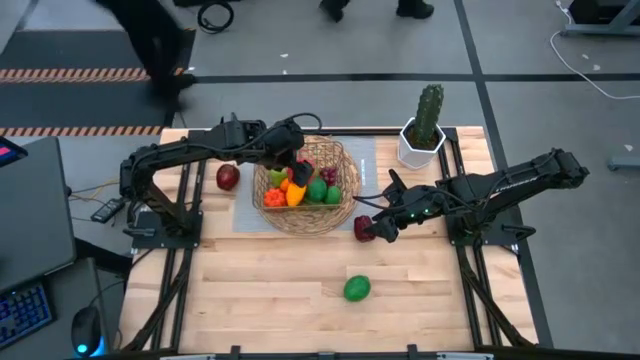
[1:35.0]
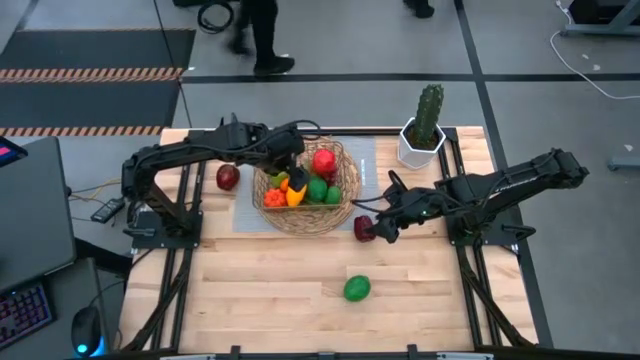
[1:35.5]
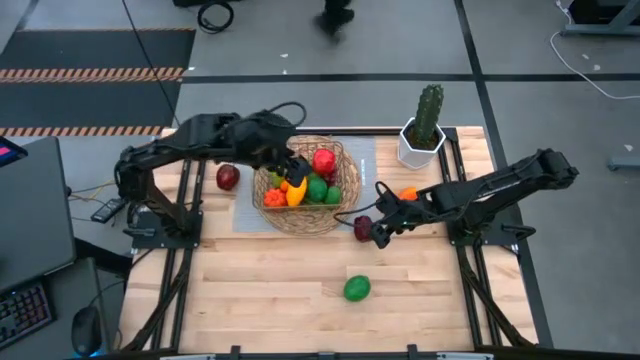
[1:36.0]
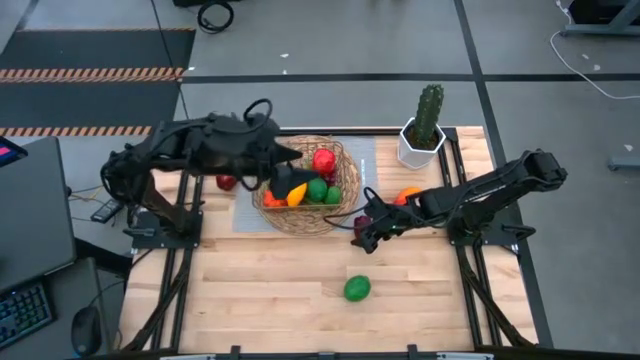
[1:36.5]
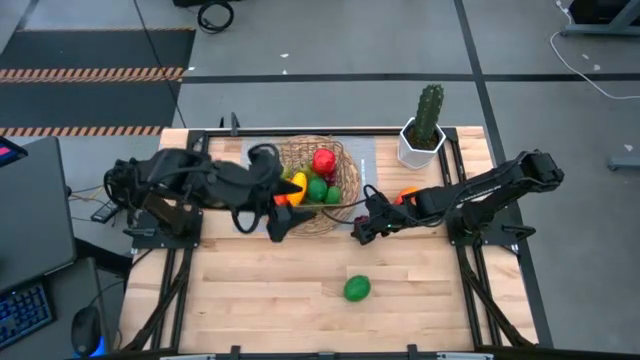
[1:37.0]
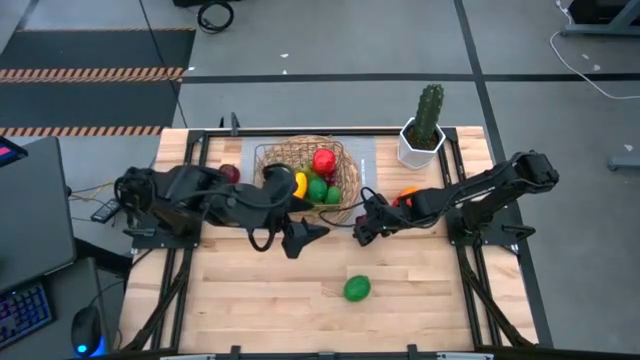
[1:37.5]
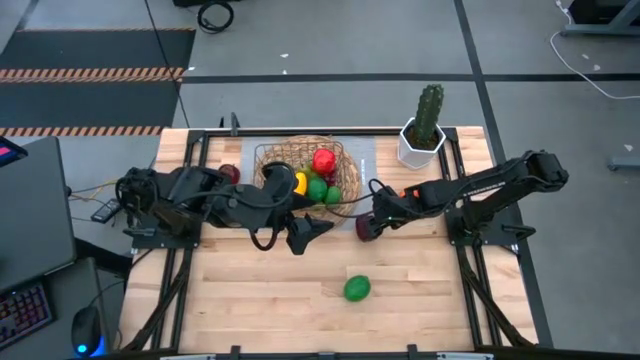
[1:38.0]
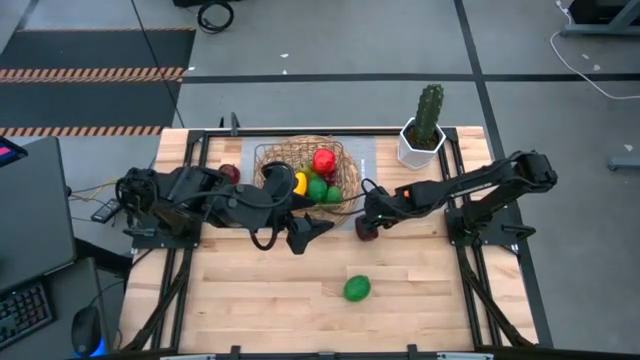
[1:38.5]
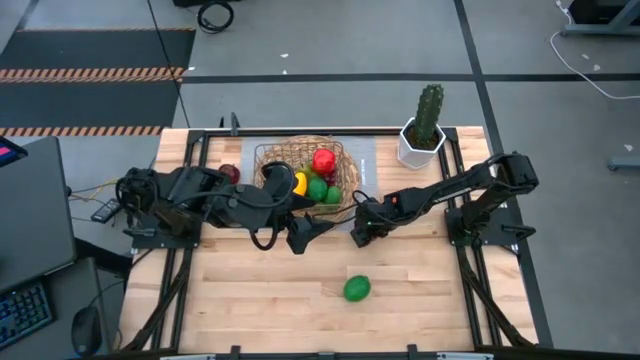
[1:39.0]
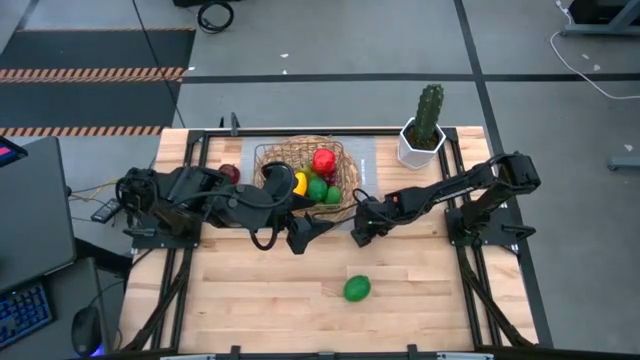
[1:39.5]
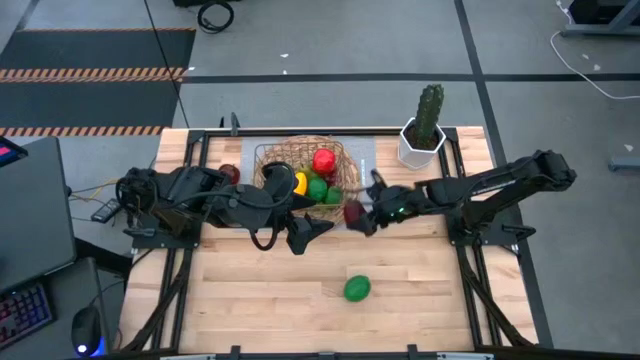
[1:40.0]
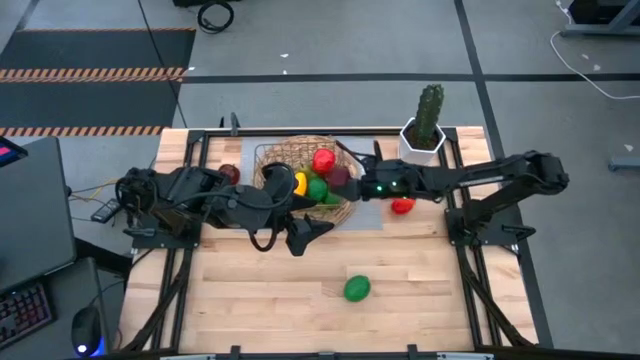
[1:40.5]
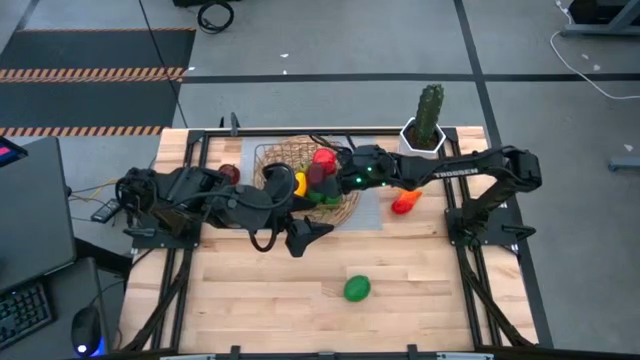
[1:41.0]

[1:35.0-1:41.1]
Task: Build produce basket
Put the bell pepper into the gold wire basket

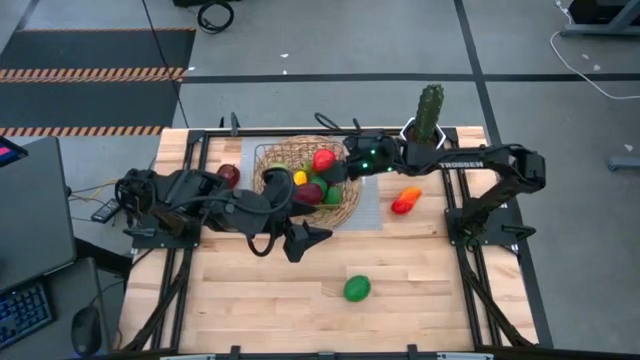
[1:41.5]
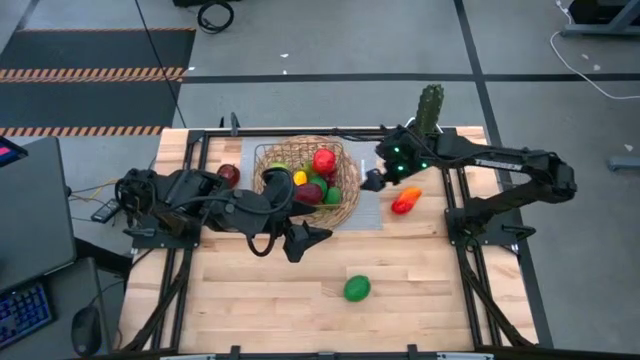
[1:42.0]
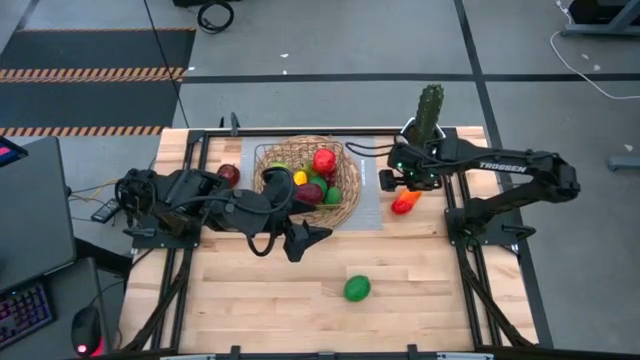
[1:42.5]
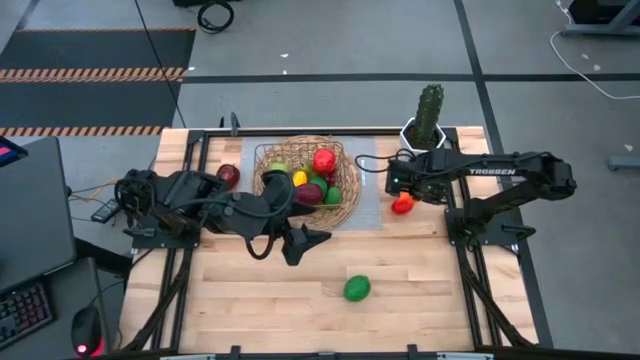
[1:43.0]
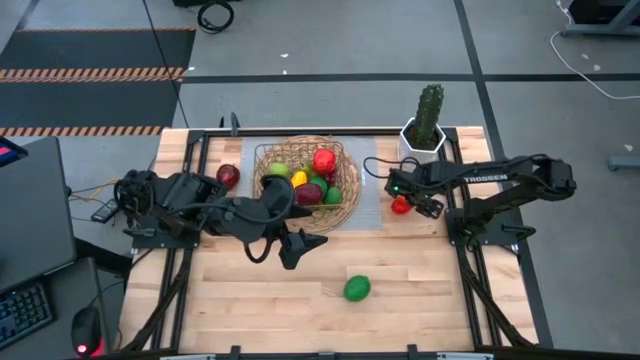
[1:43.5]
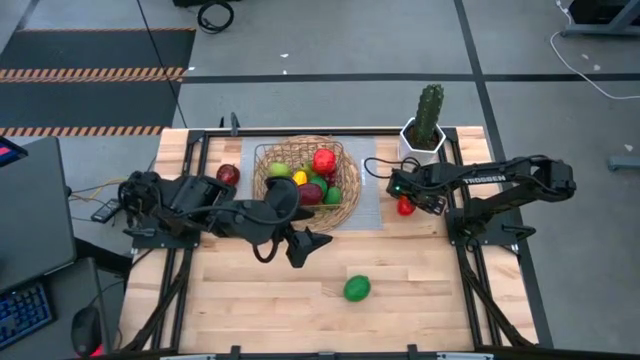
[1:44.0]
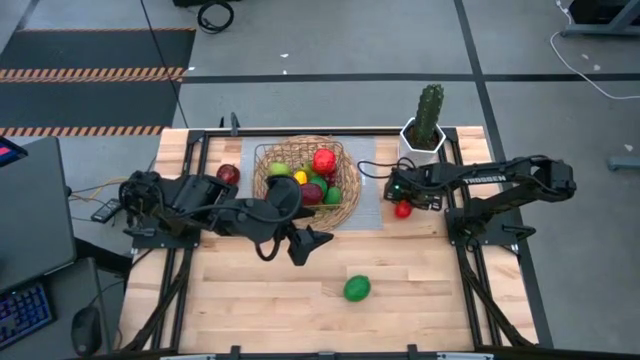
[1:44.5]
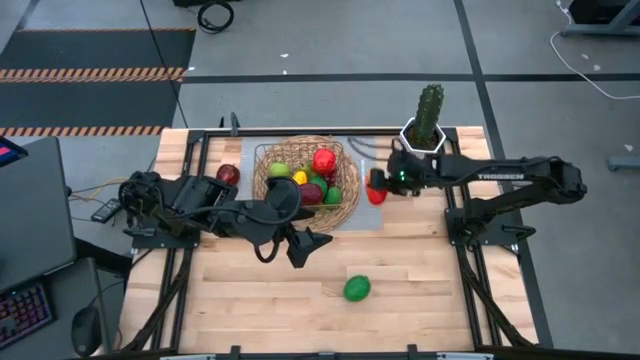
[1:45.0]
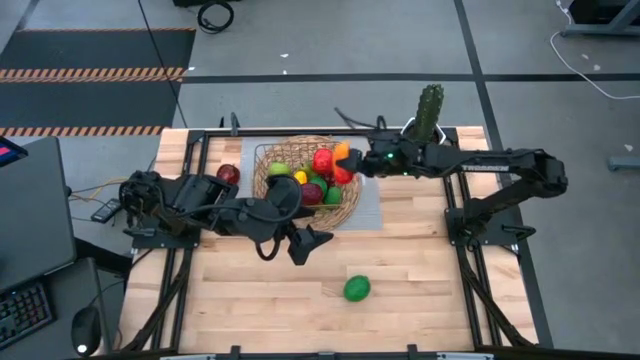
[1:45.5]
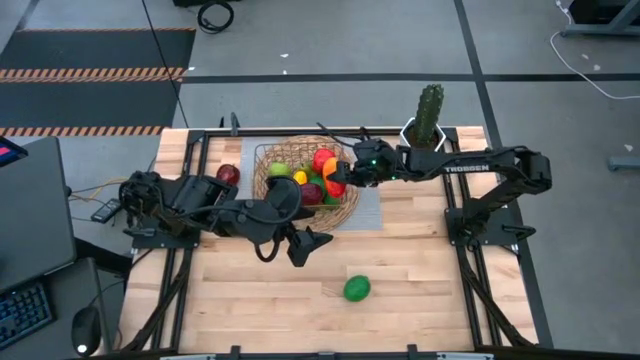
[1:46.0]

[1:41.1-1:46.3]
Put the red mango into the gold wire basket

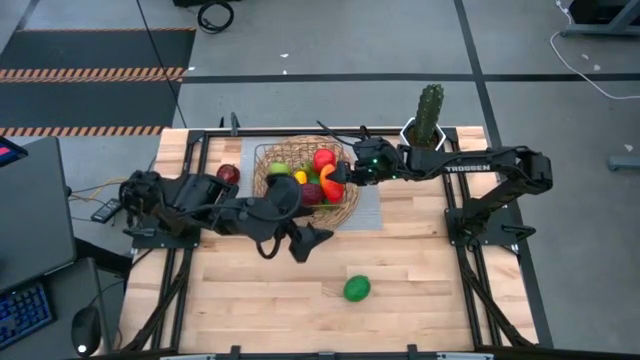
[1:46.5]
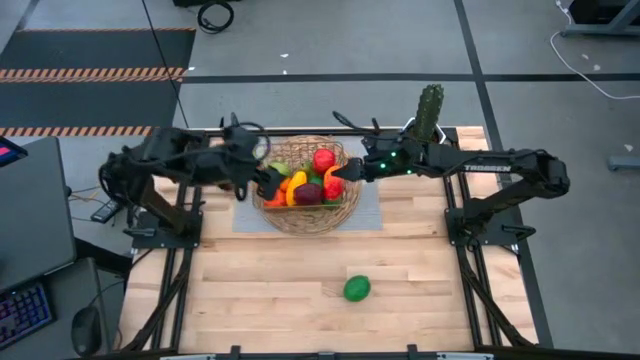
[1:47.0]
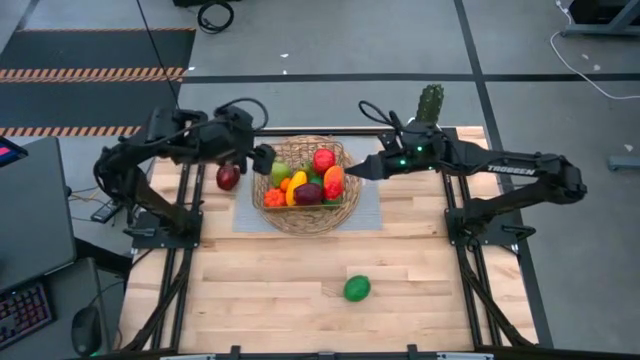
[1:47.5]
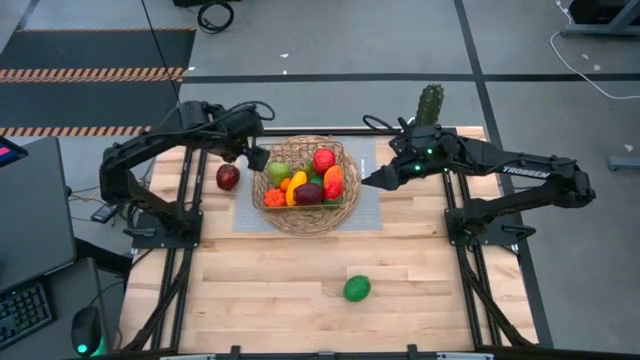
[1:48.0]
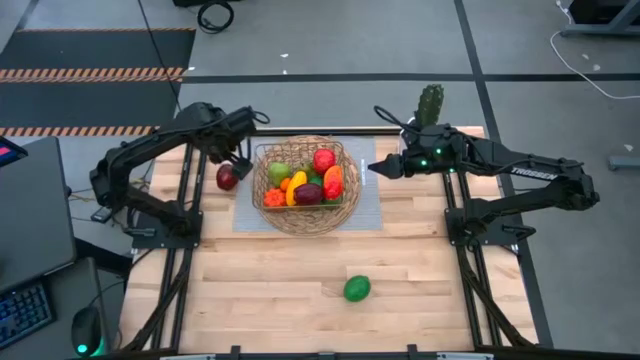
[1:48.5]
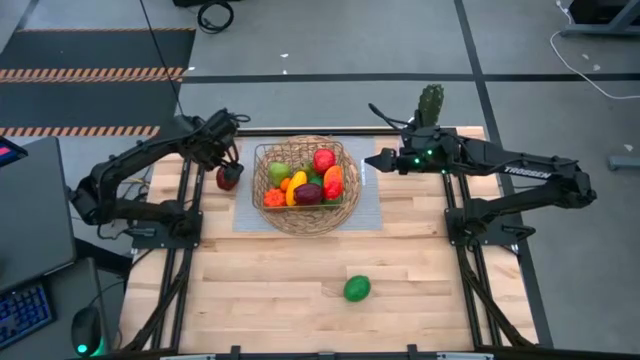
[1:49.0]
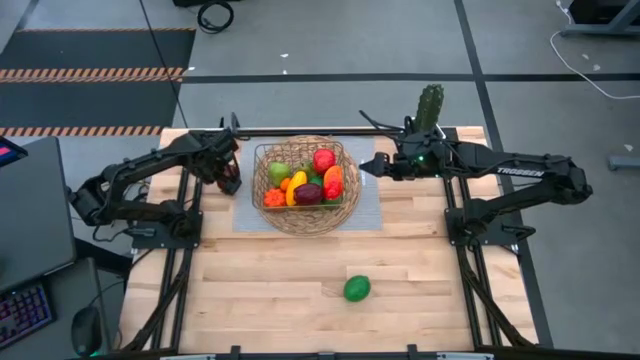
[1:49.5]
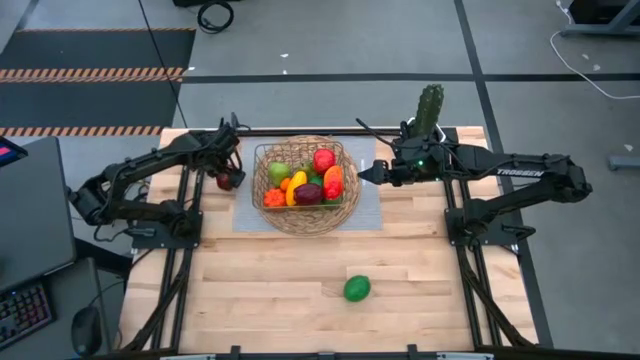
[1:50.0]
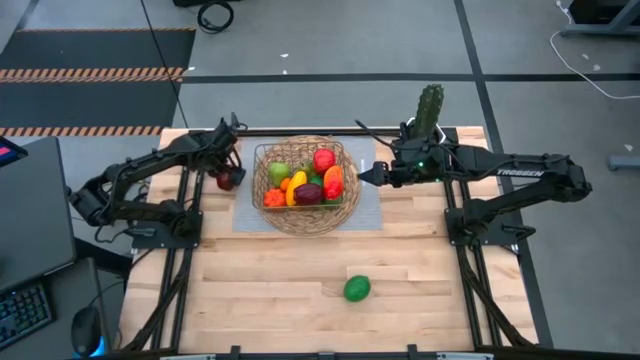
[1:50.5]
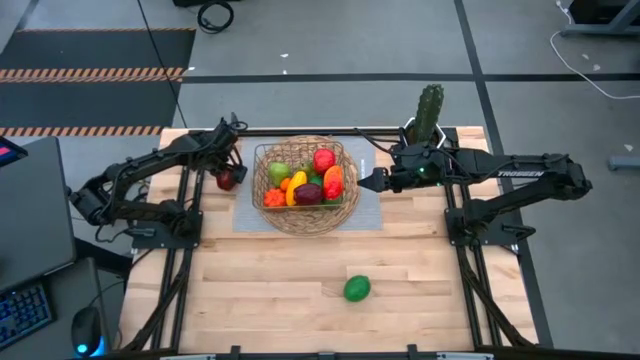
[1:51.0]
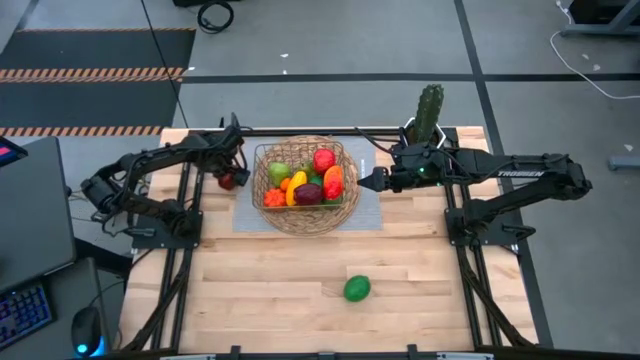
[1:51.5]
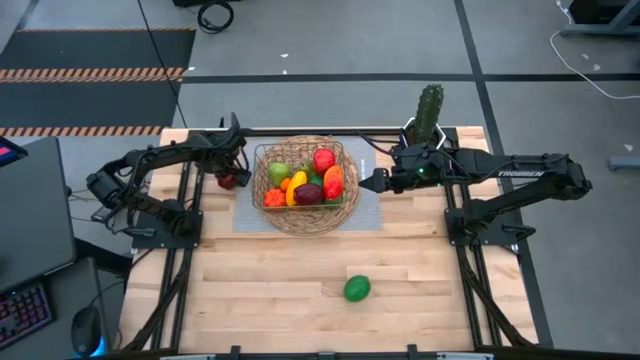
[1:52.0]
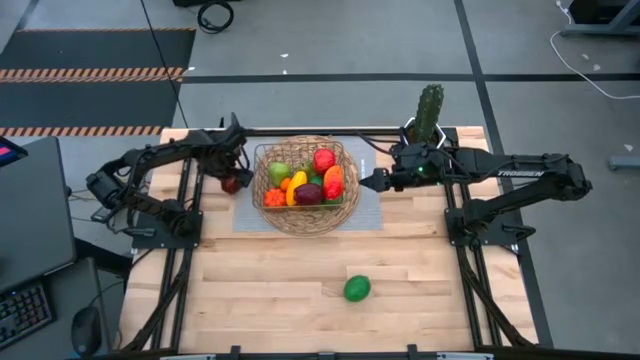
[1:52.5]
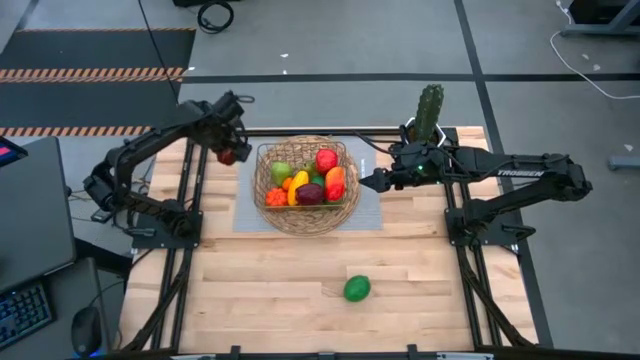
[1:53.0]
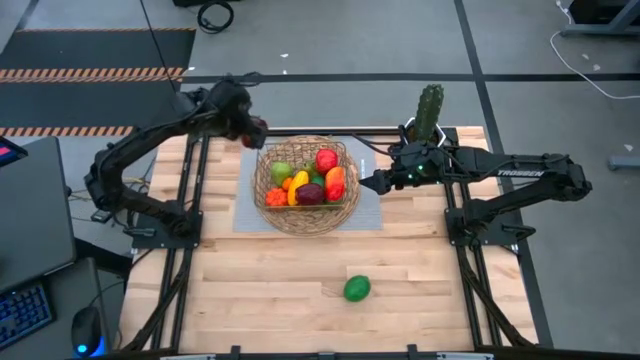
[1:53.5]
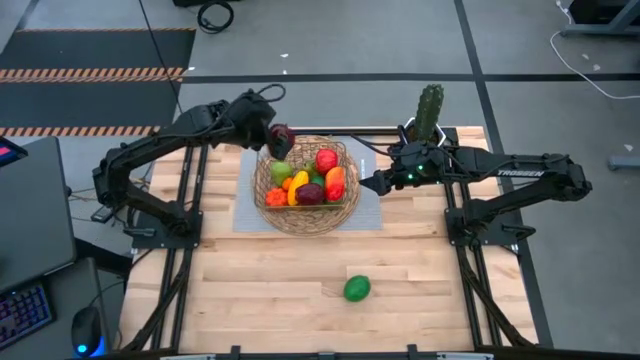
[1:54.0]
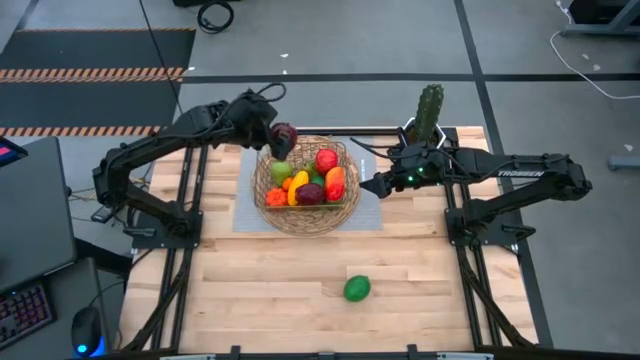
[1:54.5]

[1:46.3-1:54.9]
Put the dark apple into the gold wire basket

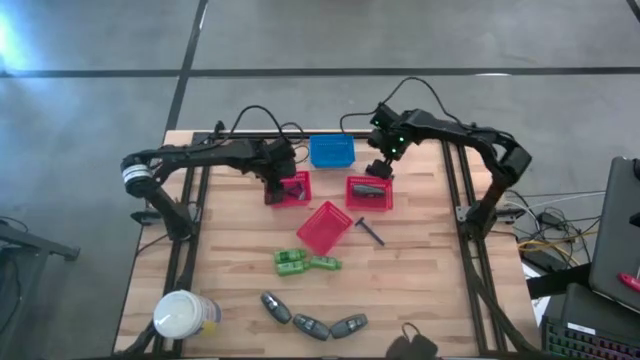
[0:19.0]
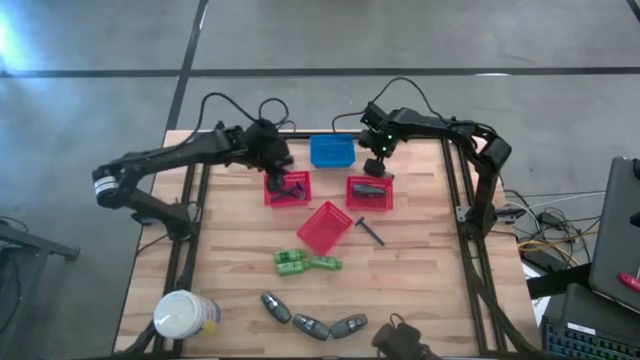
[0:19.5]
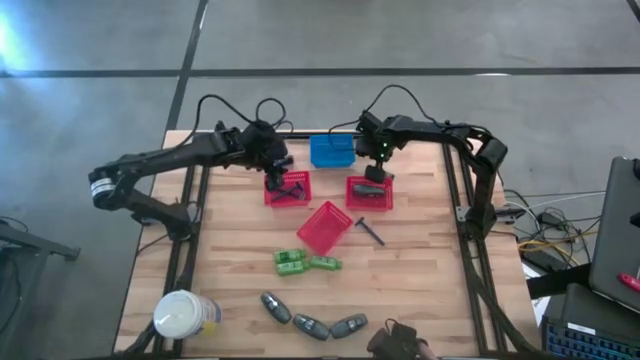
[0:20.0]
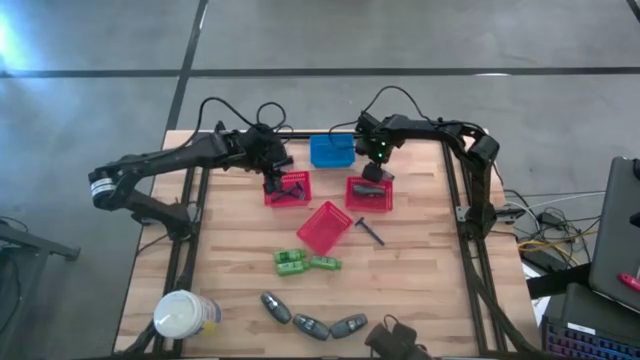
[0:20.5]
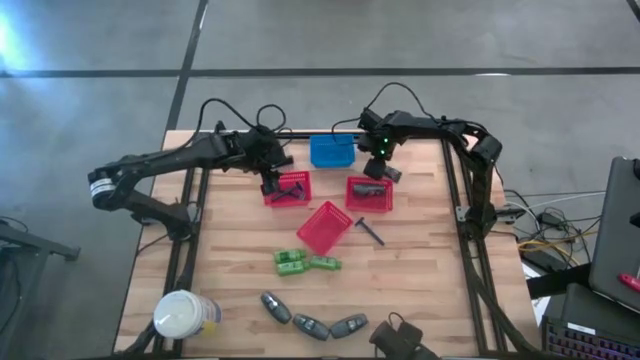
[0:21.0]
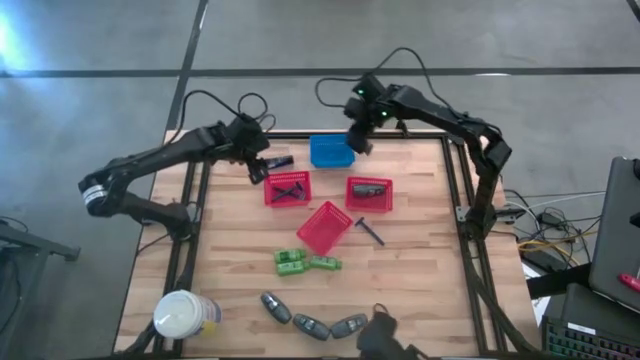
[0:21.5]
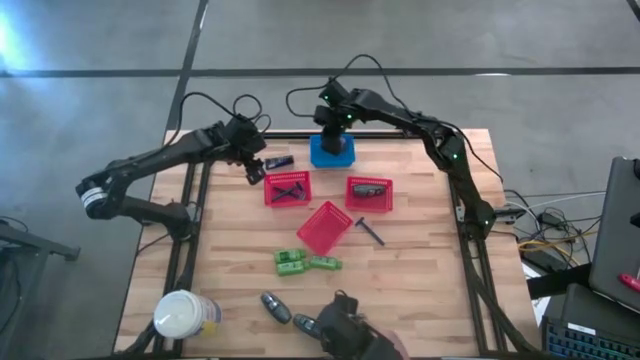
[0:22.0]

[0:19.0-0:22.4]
Task: Pick & Place Travel size toiletries
Put the dark blue shaving cream into the blue bin
